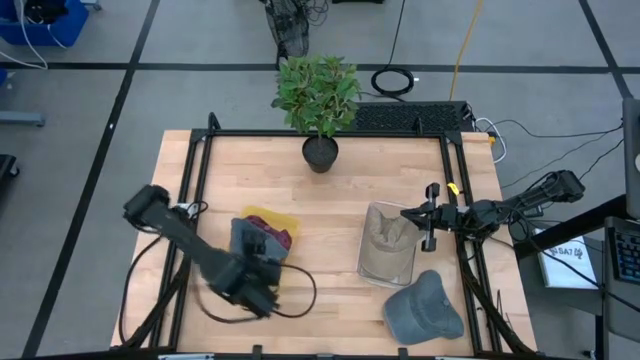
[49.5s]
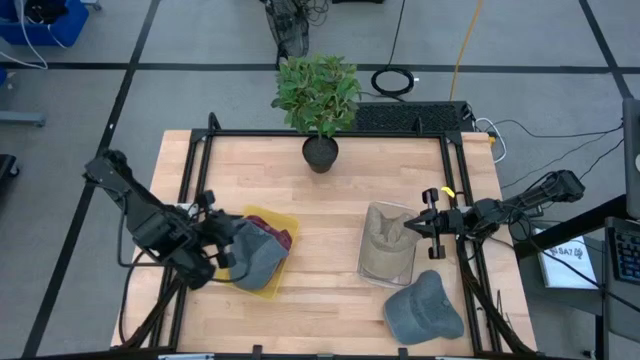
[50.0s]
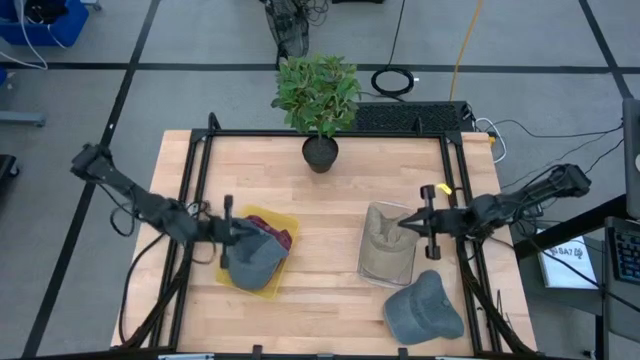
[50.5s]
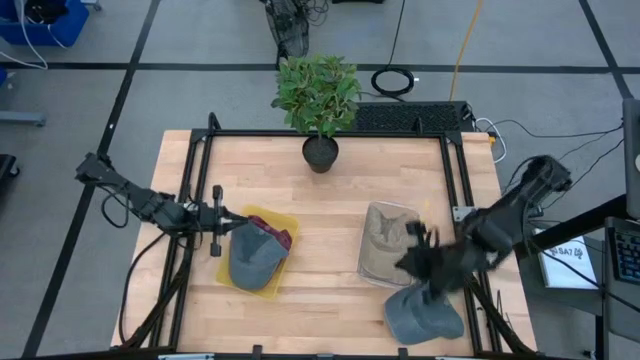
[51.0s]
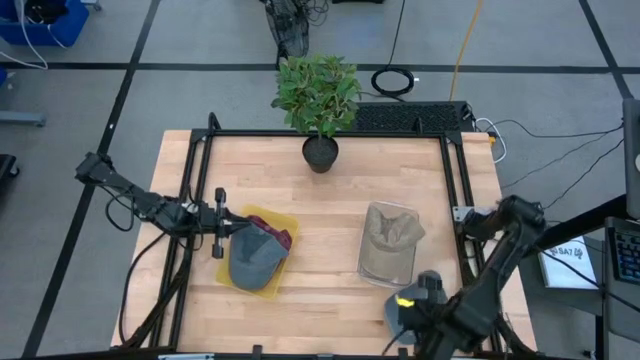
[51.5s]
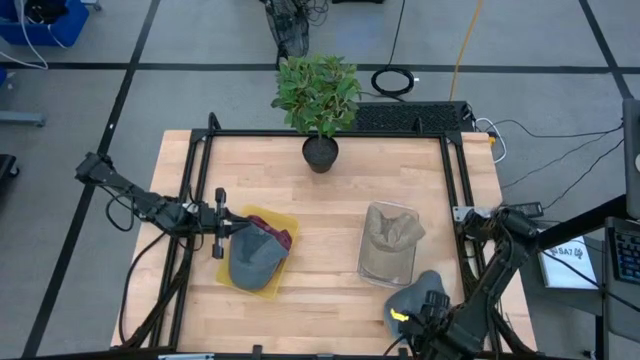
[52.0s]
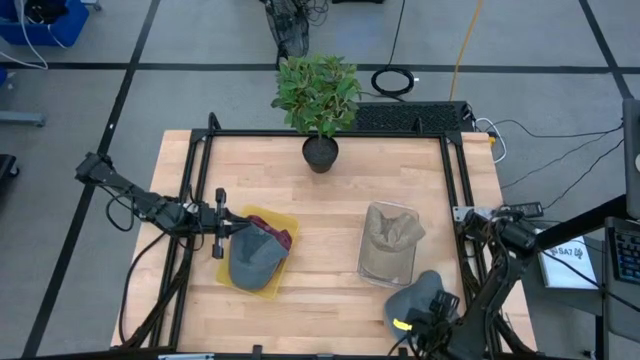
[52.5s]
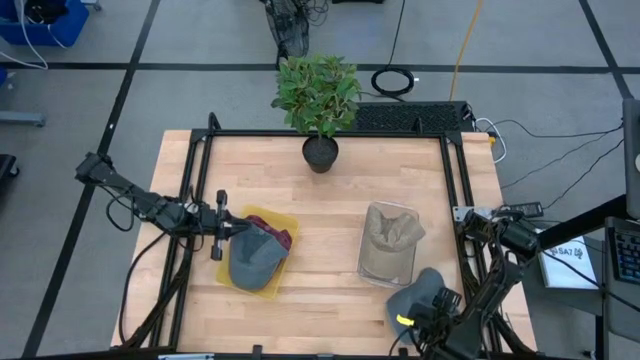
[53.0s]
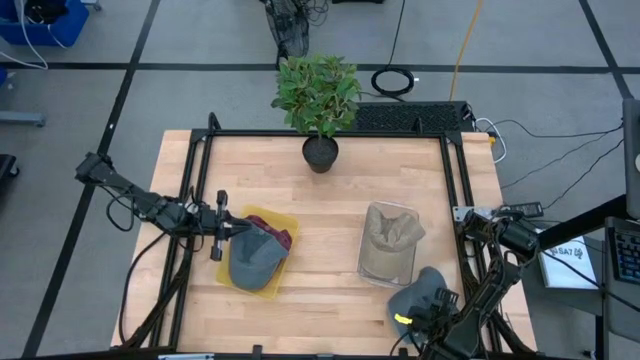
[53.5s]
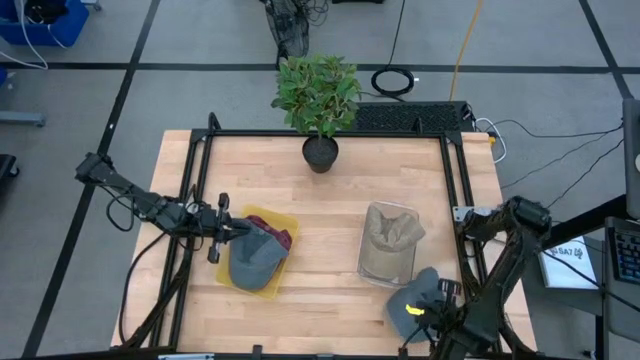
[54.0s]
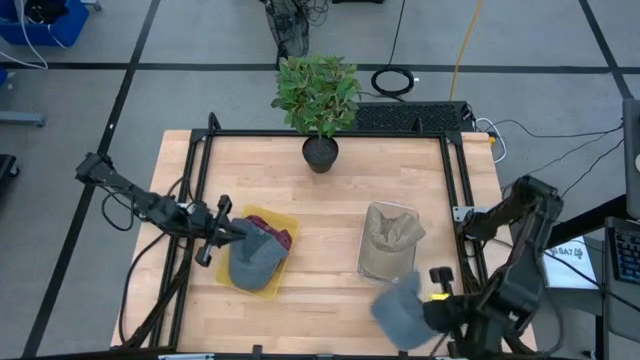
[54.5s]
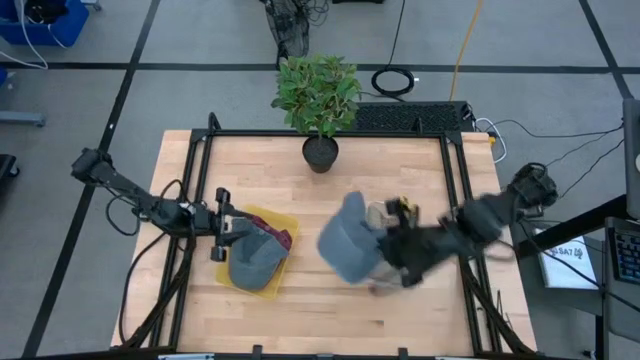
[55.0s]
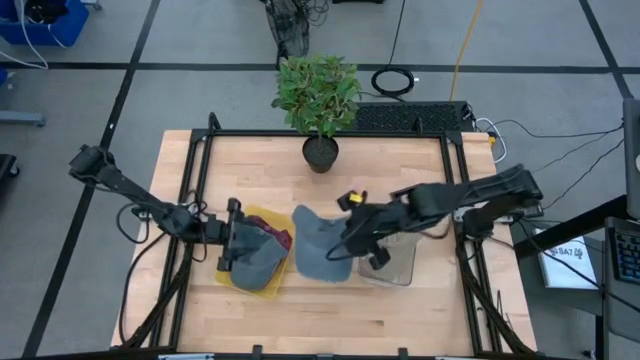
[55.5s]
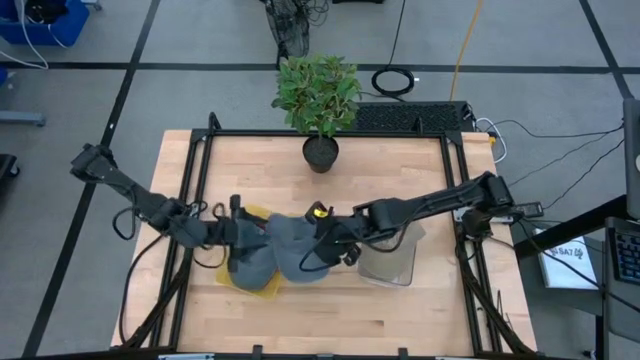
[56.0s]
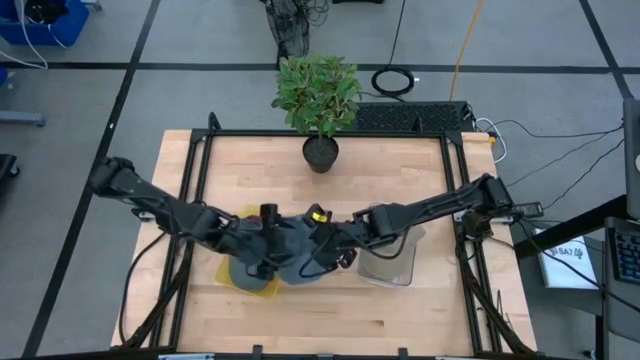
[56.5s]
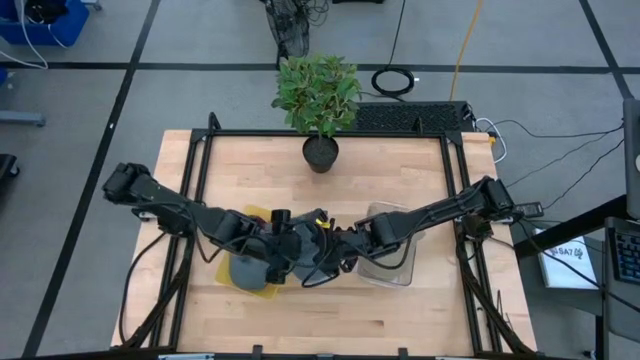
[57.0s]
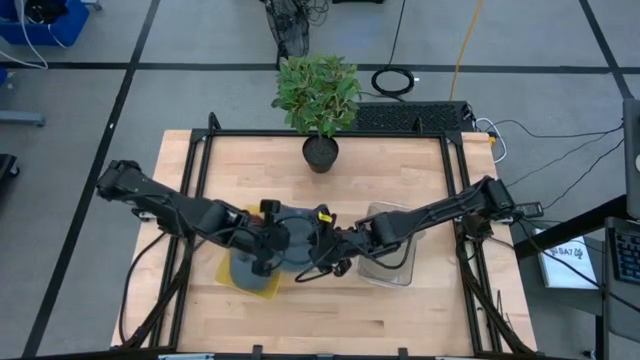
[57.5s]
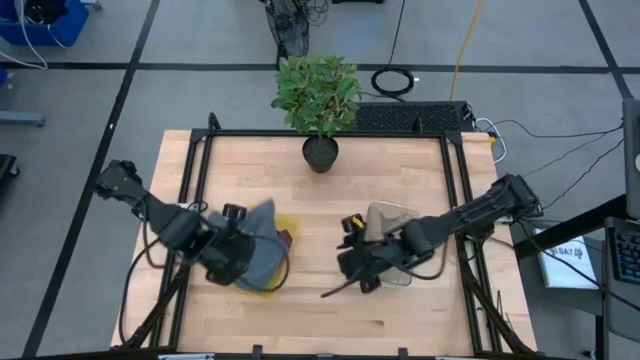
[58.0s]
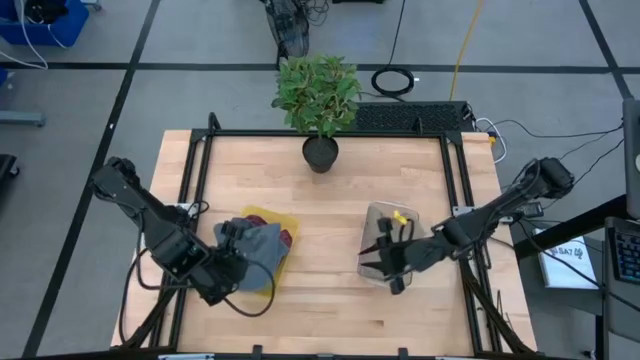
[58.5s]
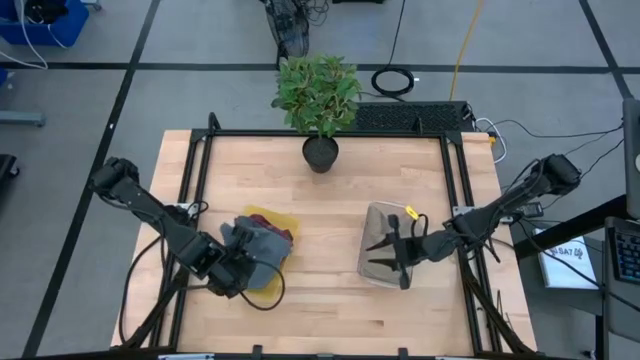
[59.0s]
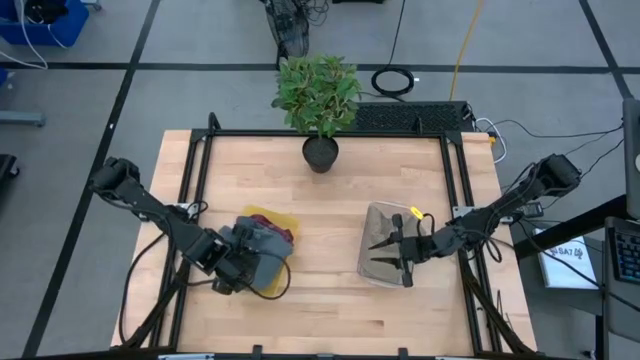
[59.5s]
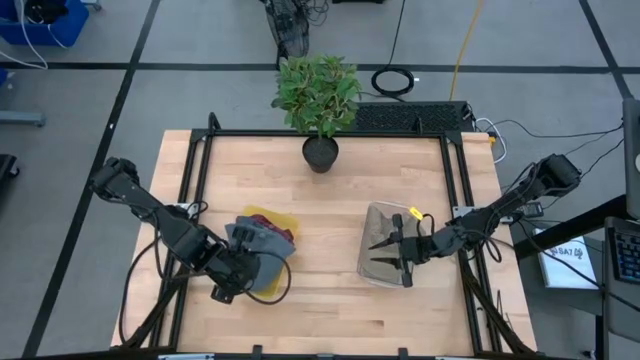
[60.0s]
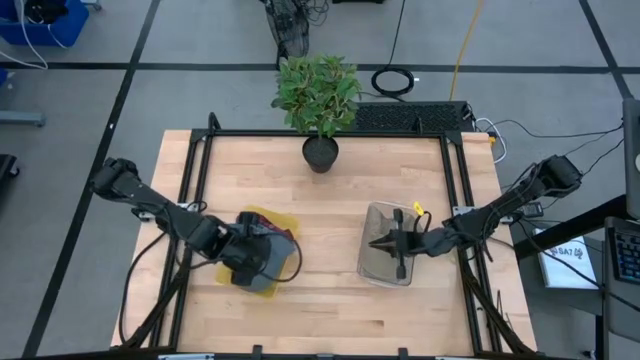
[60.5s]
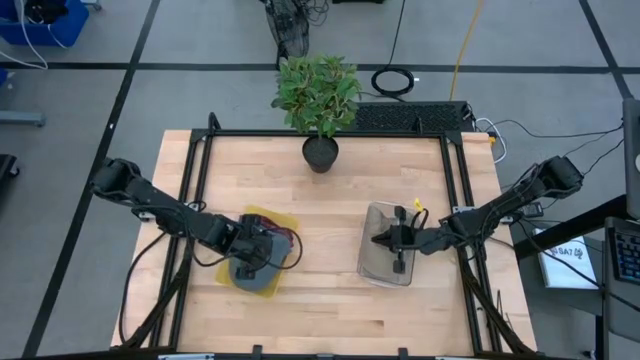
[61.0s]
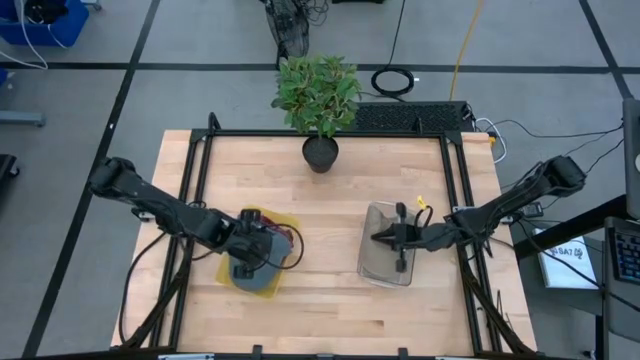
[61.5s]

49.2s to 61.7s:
Task: Pick & Place hat
Put the gray cap into the yellow bin

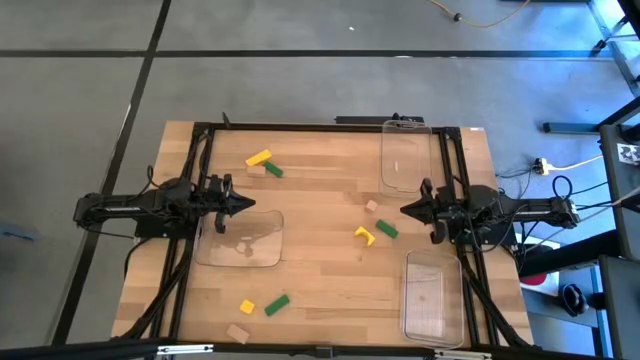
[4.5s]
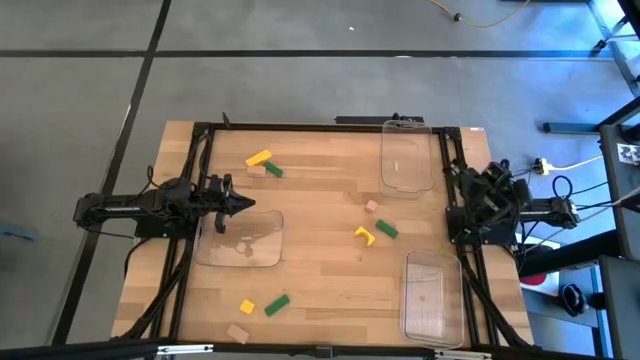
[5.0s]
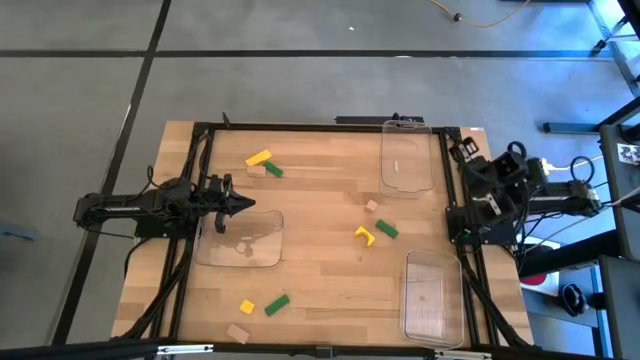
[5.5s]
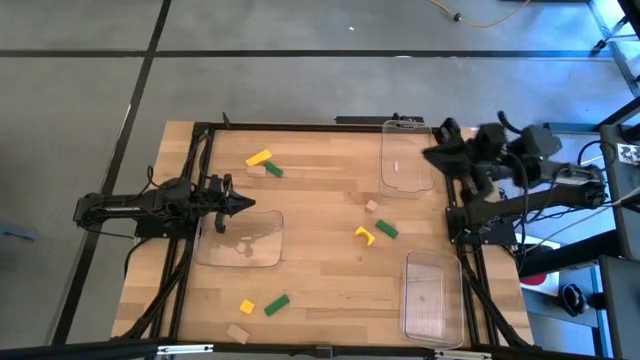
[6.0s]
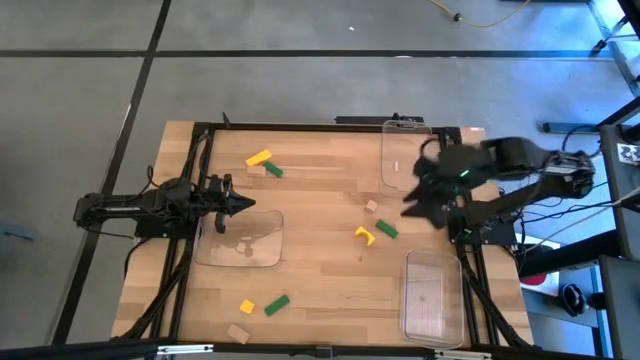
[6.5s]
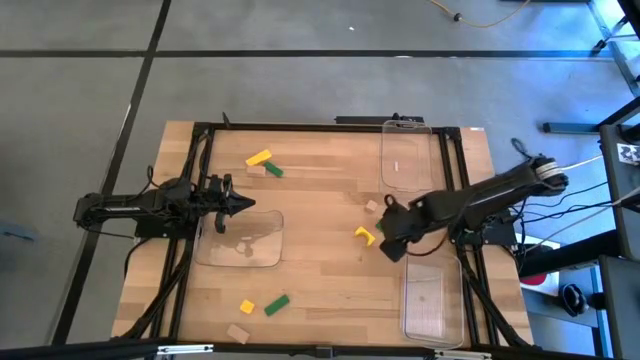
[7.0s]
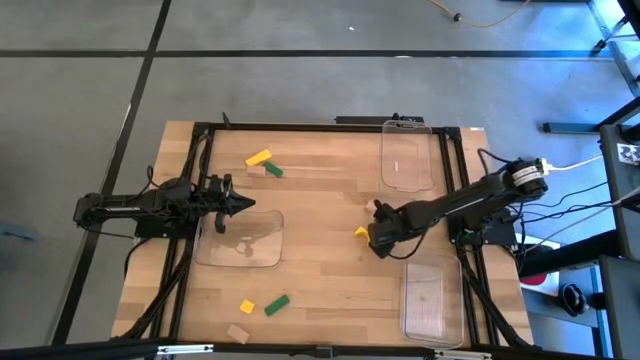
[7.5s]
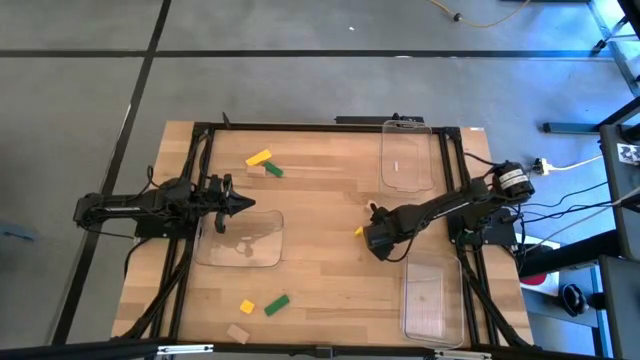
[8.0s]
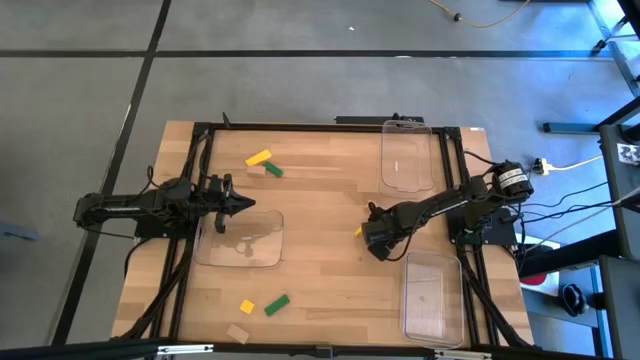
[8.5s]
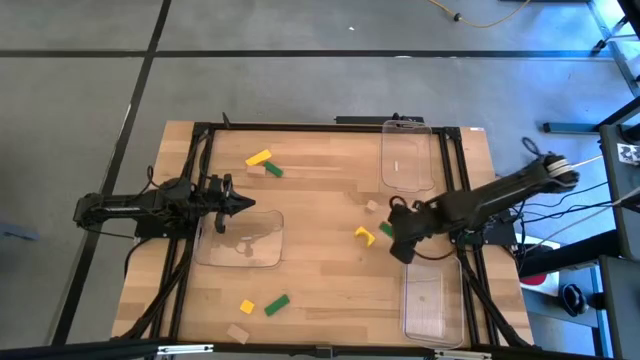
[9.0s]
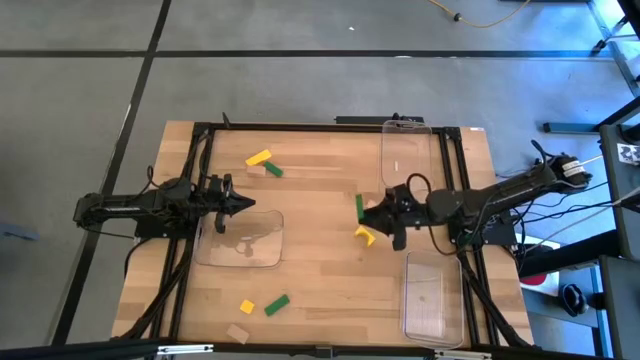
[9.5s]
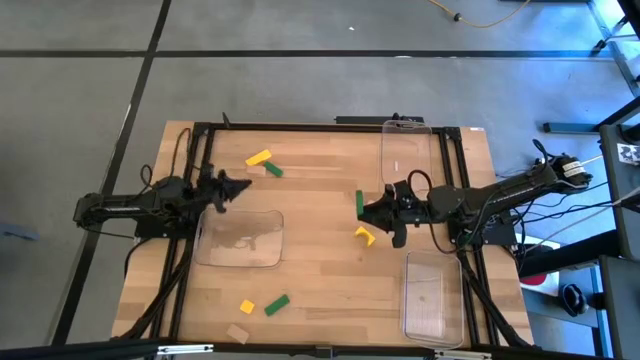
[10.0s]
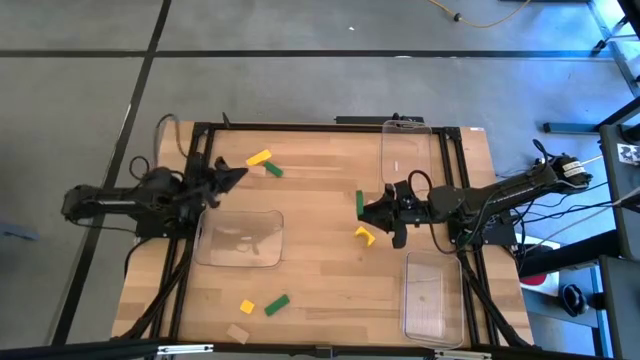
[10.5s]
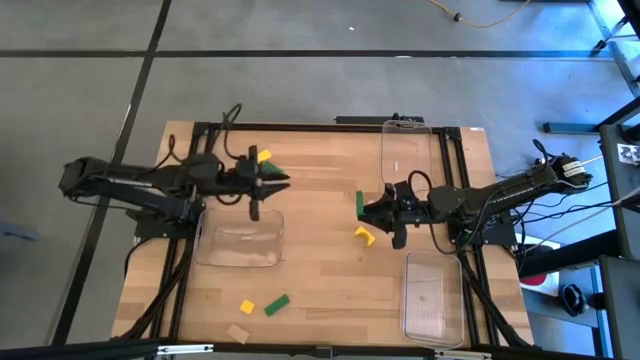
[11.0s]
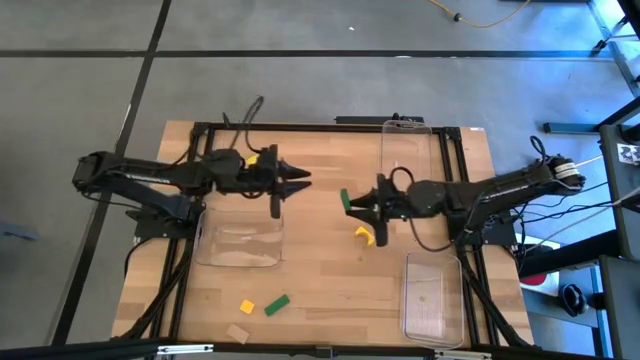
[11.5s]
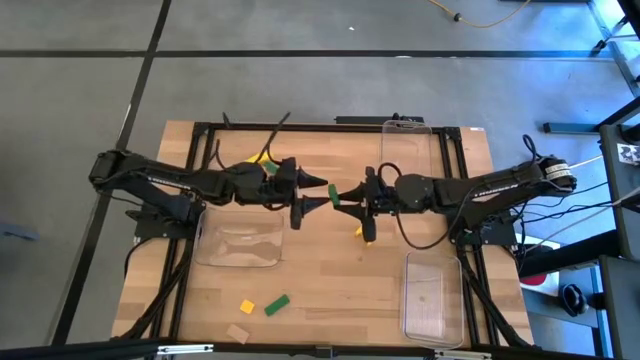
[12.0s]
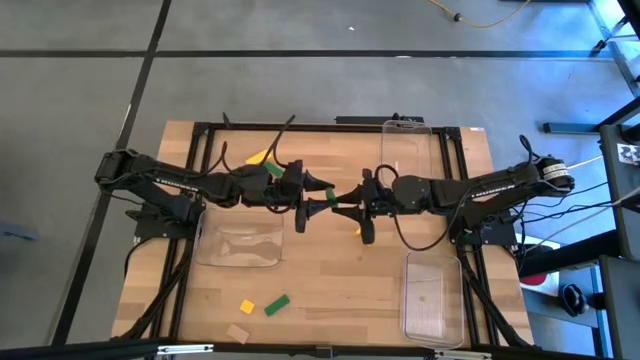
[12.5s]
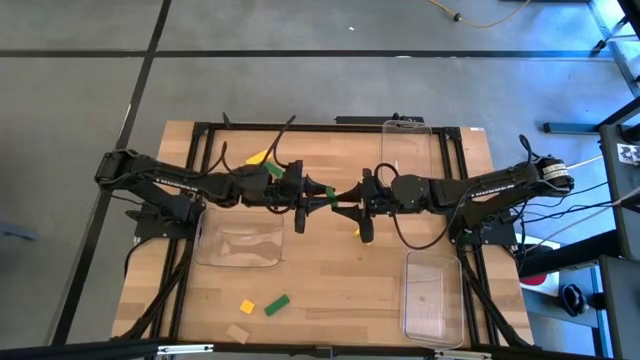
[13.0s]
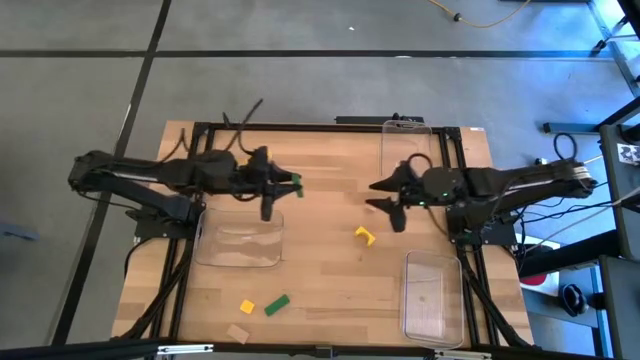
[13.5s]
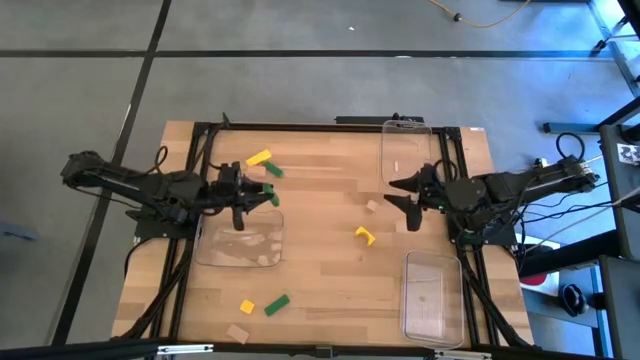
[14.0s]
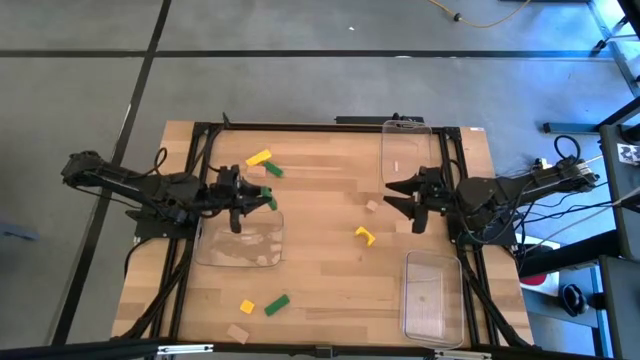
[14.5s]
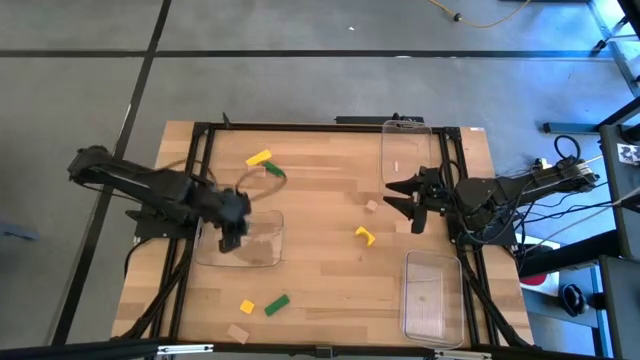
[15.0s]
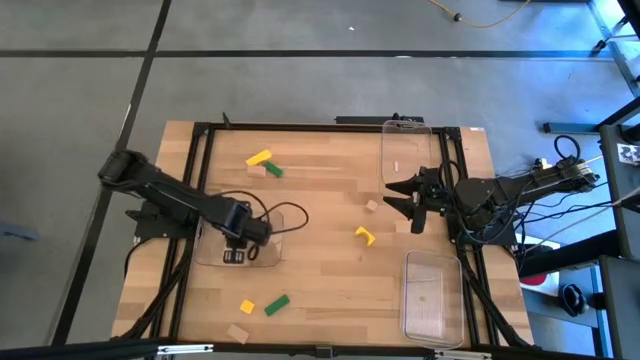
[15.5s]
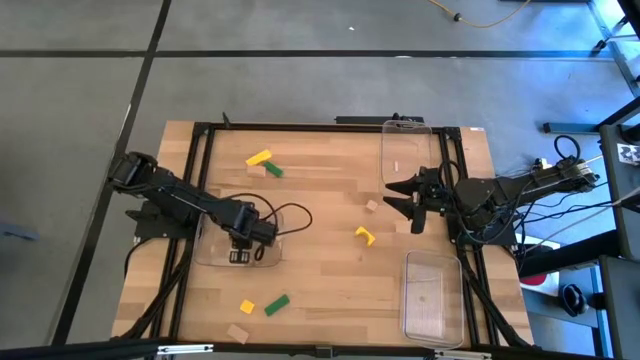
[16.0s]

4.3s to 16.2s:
Task: Sort & place blocks by color
Put the right green block into the left transparent bin
